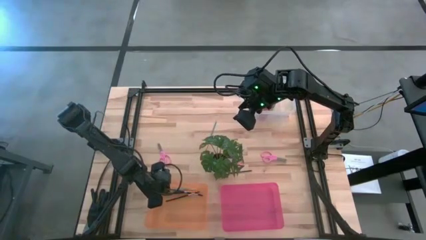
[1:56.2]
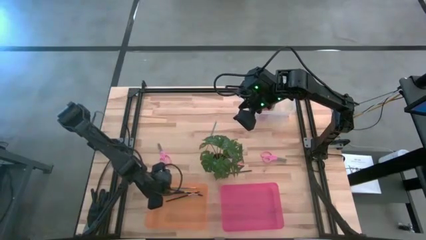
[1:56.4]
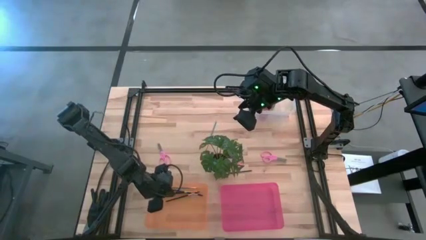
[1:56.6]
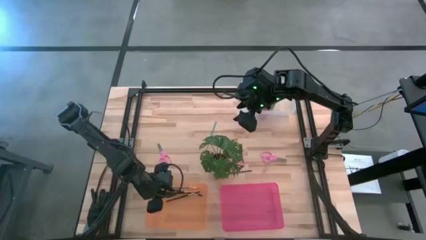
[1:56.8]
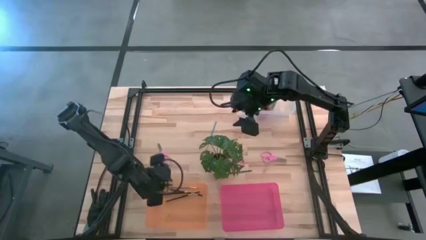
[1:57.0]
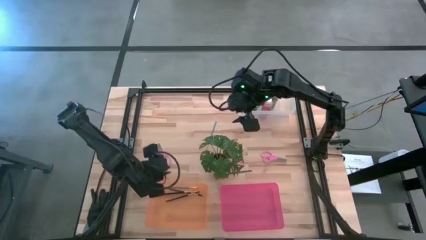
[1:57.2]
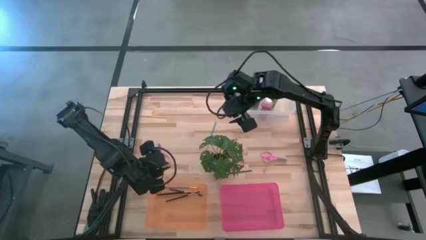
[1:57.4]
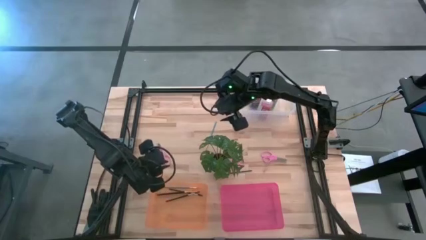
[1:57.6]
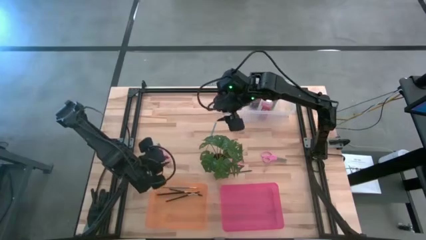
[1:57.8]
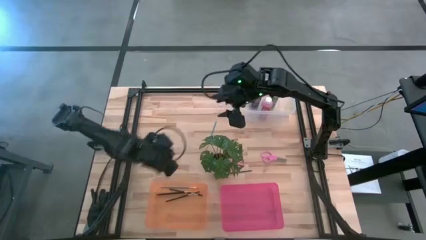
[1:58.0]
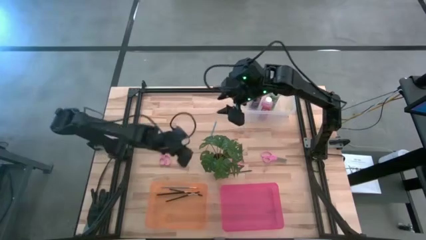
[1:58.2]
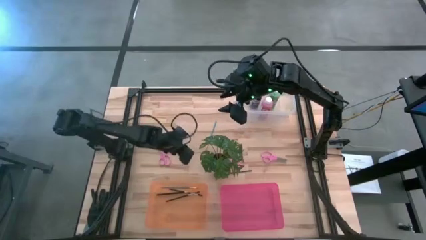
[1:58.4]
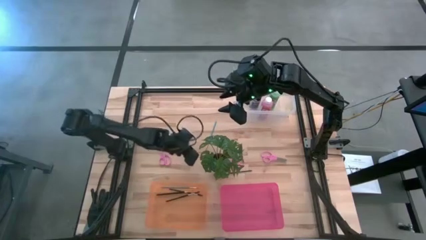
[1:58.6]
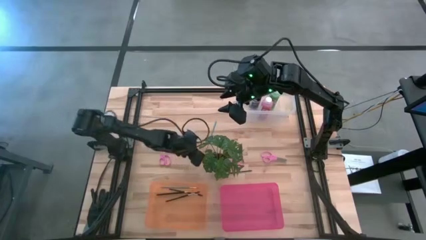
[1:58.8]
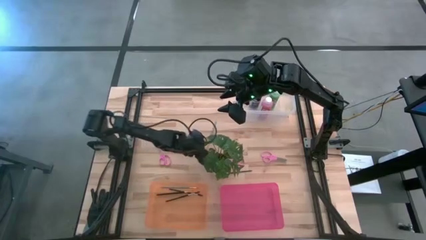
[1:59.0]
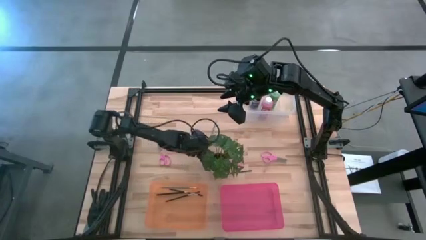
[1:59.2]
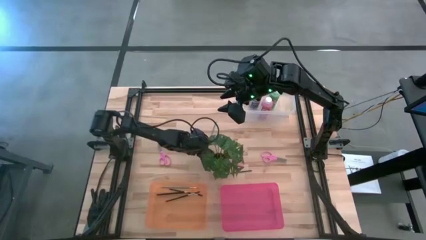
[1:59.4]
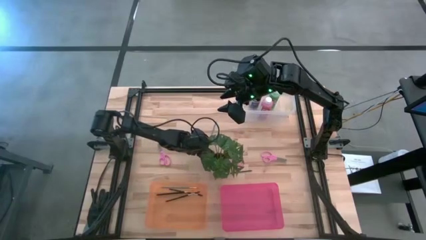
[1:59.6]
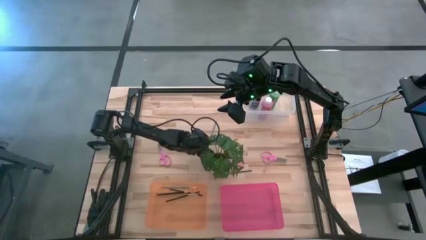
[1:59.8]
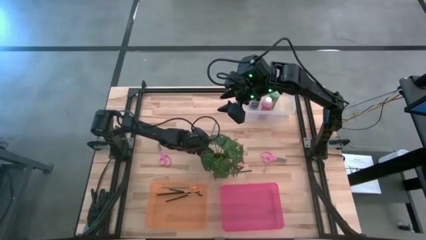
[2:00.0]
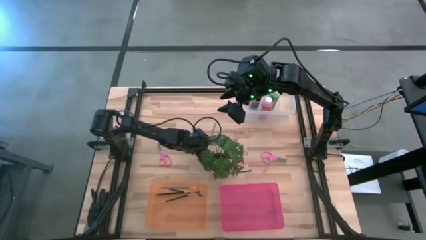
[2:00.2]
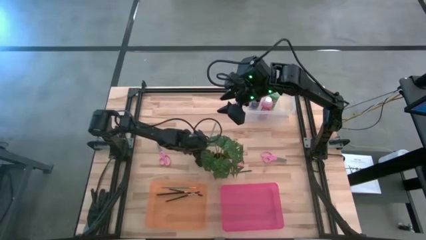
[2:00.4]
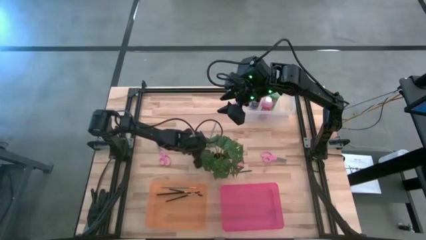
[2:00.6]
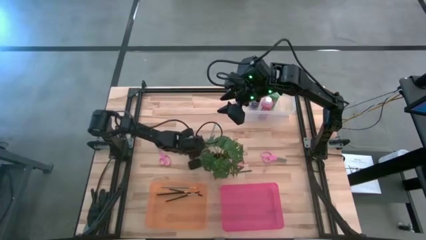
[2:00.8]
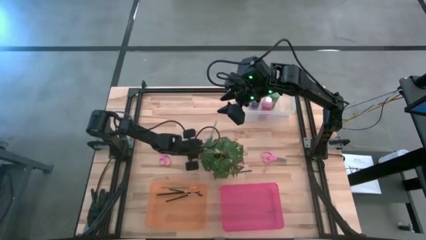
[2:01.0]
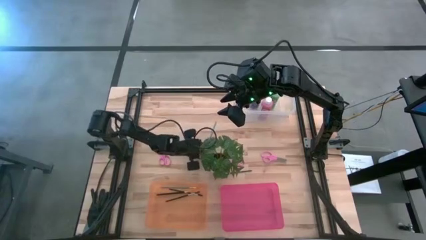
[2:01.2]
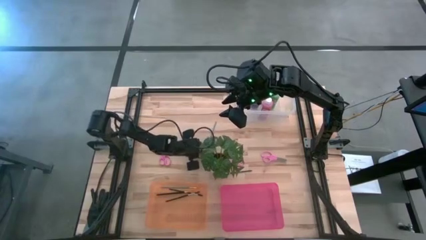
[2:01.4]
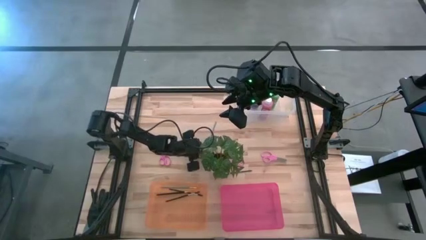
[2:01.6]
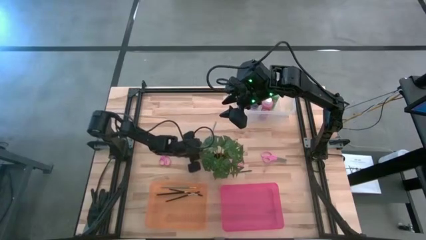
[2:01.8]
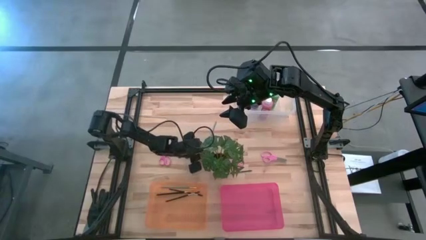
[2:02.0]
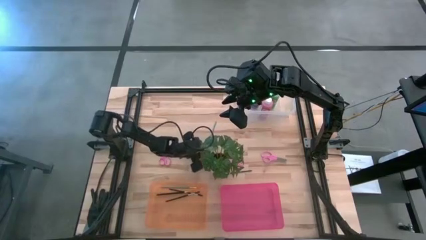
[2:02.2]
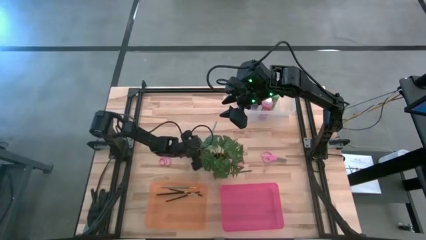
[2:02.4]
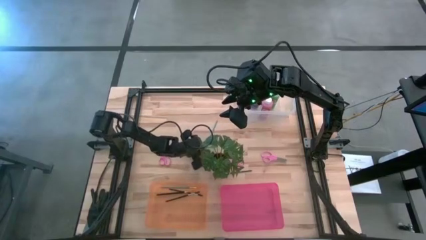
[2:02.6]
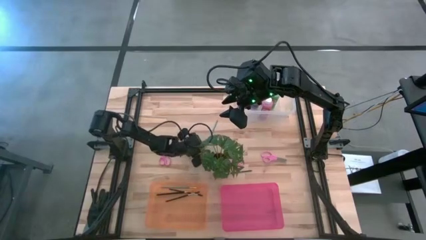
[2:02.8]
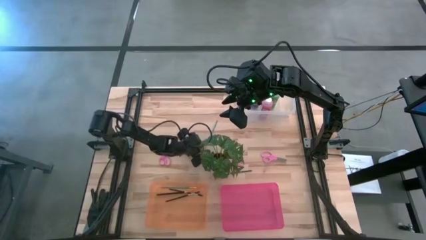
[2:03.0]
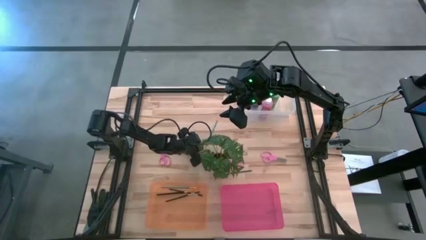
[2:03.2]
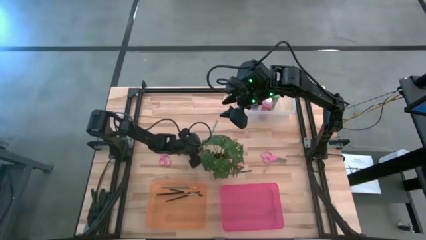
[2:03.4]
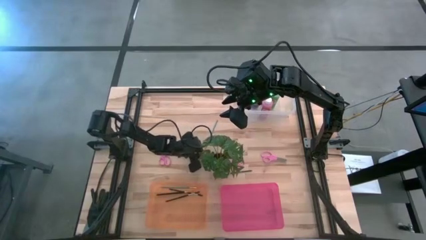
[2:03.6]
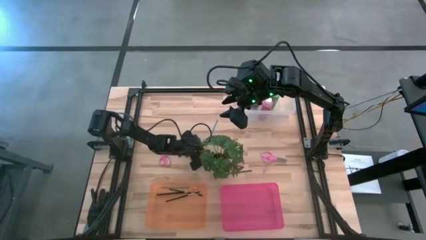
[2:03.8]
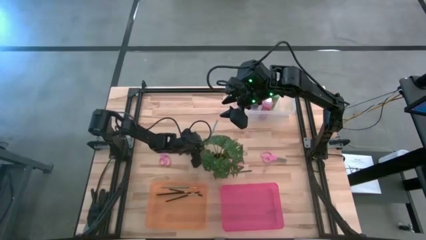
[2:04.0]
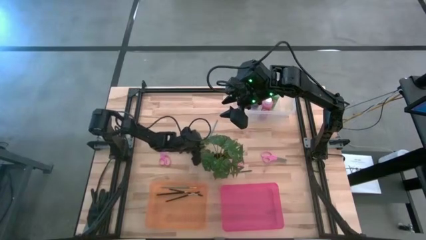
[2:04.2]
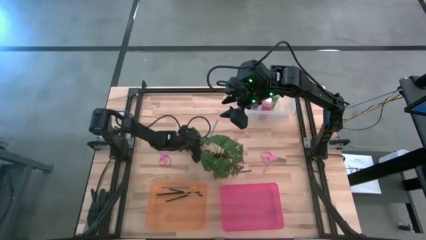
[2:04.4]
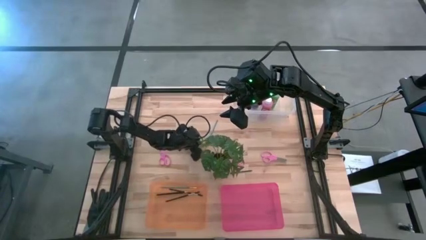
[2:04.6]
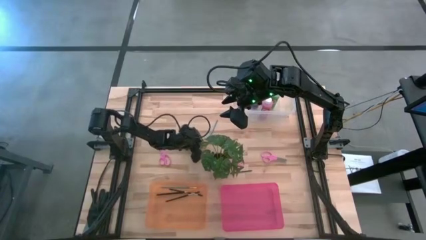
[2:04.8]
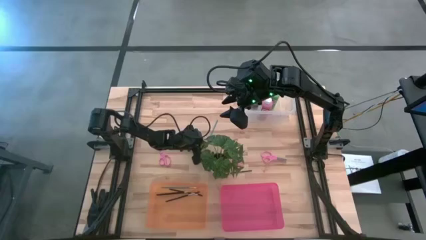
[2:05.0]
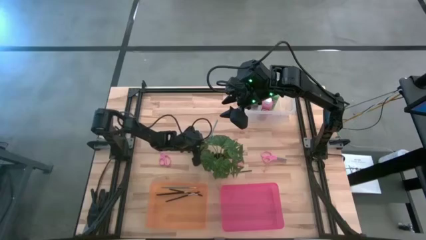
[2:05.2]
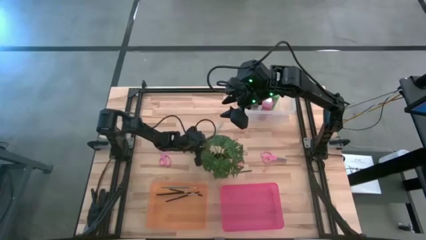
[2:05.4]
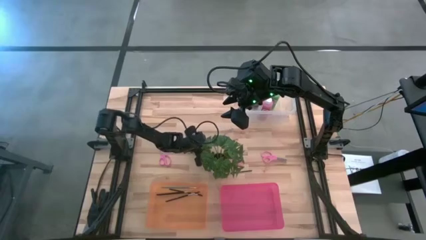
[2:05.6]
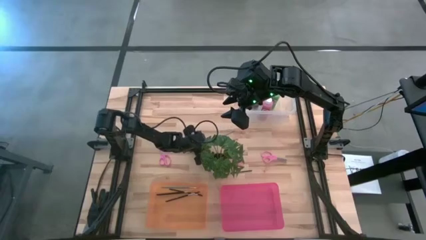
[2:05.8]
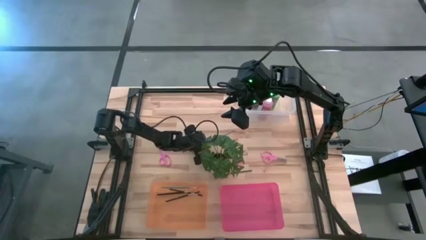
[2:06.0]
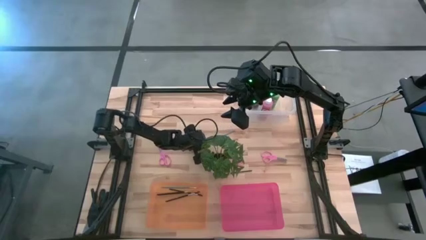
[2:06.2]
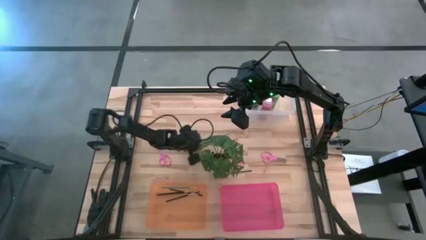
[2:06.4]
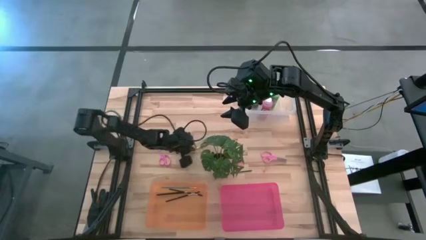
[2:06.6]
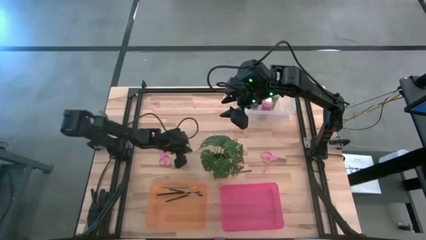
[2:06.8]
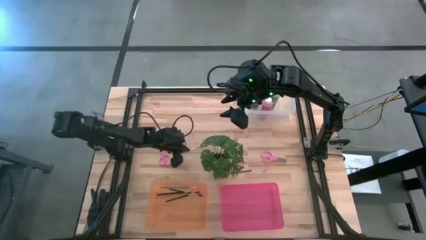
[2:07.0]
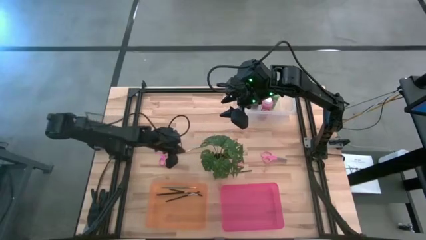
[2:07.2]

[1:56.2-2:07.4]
Task: Pick & Place Paint Supplies
Put the blue paint brush into the orange bin
